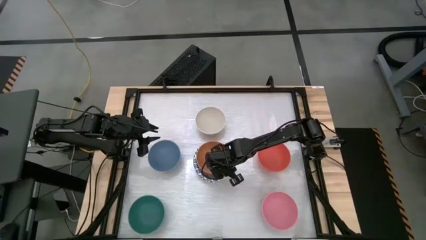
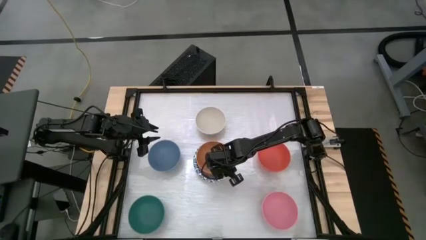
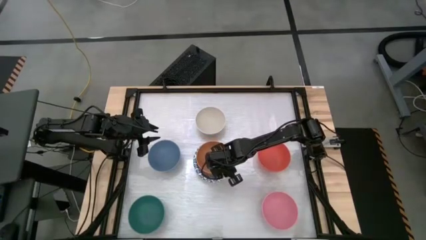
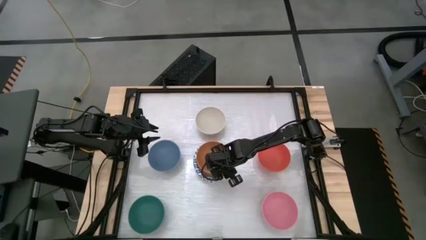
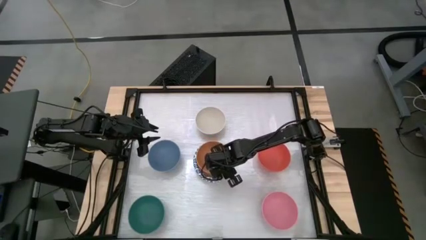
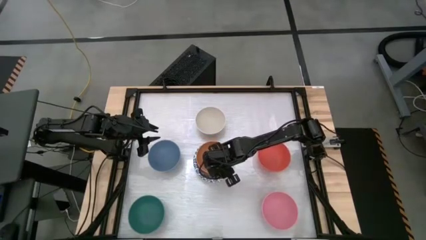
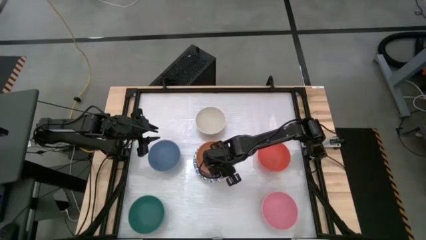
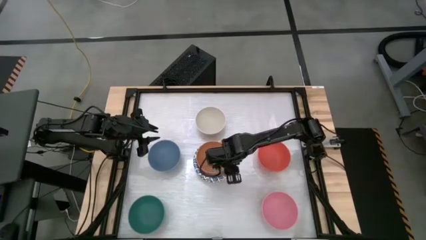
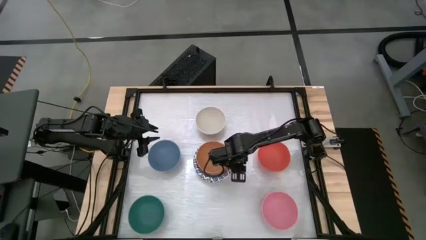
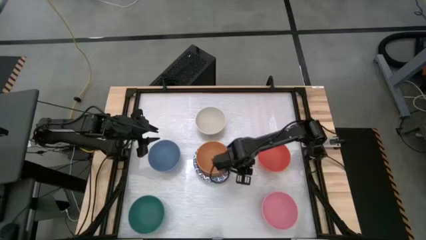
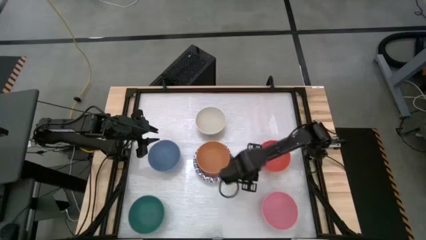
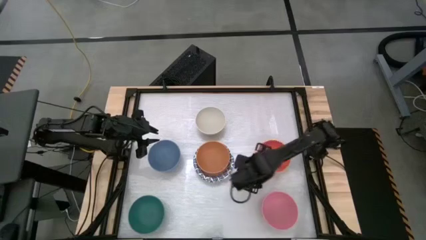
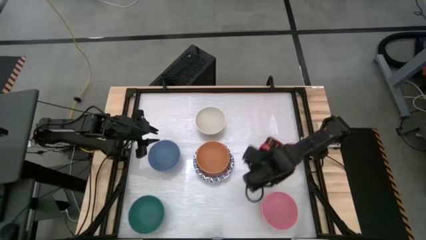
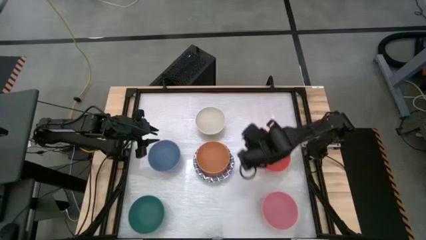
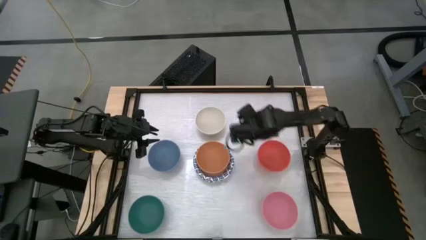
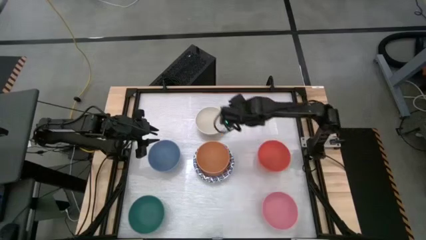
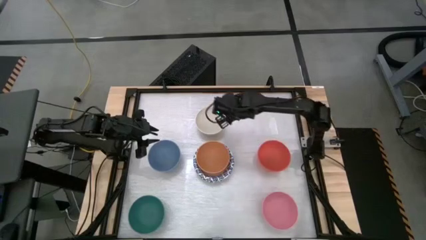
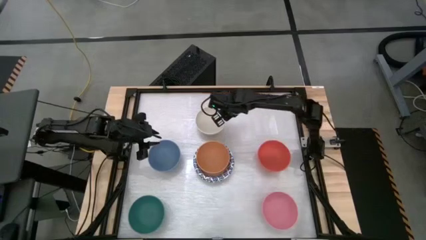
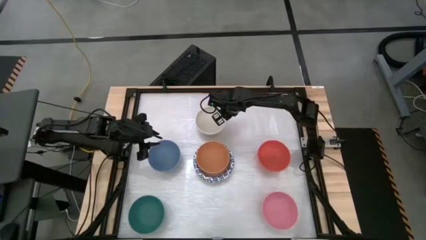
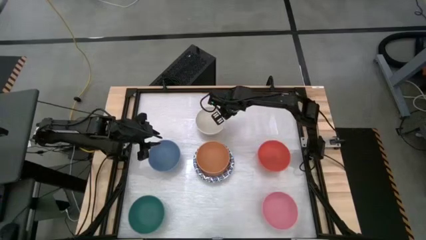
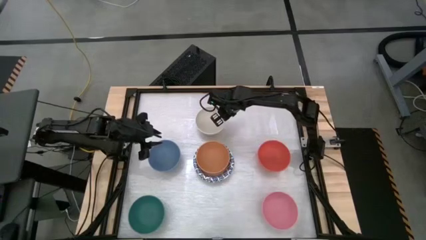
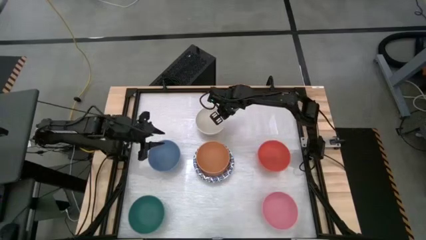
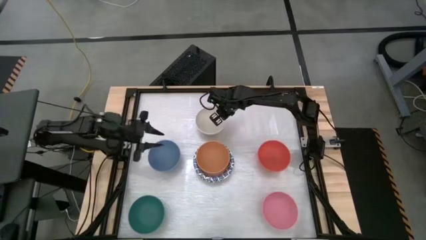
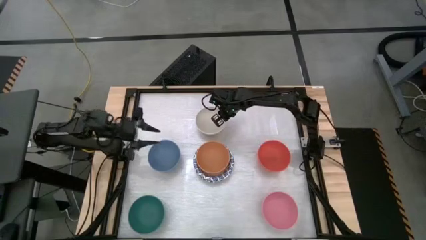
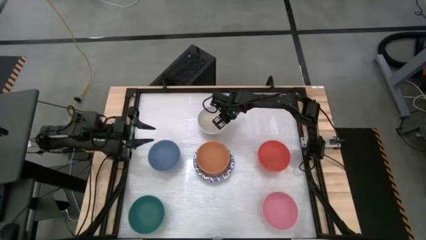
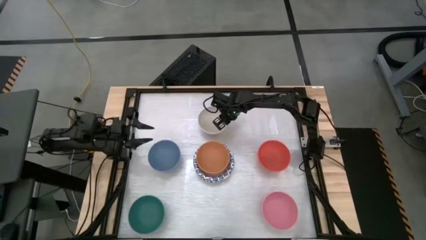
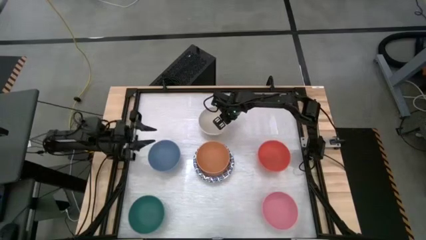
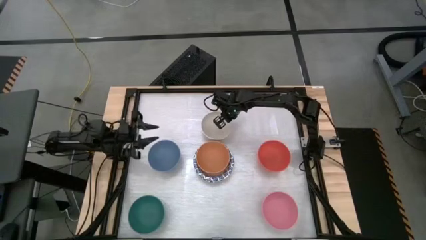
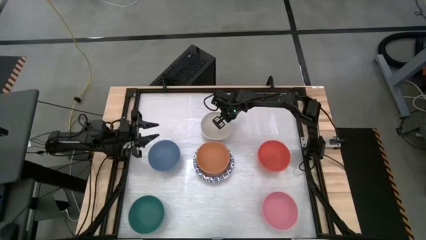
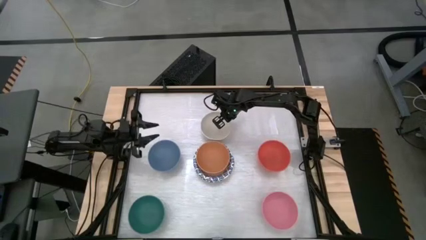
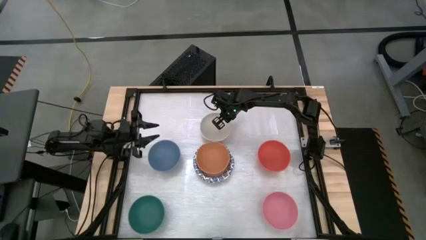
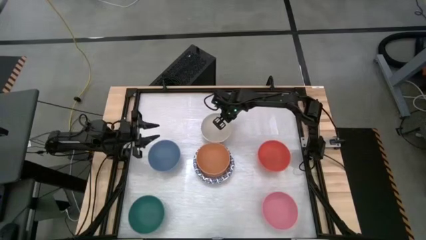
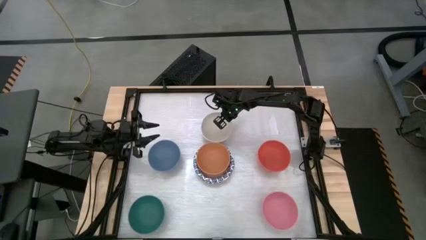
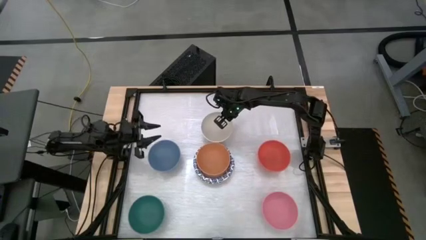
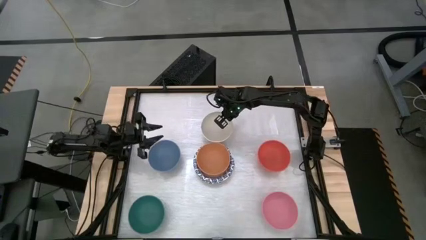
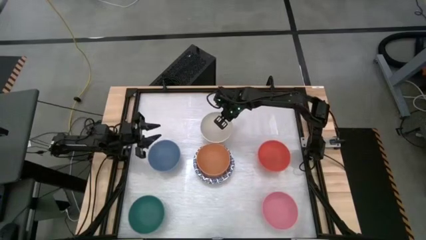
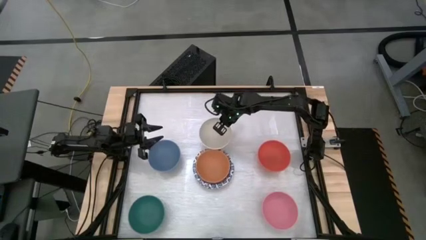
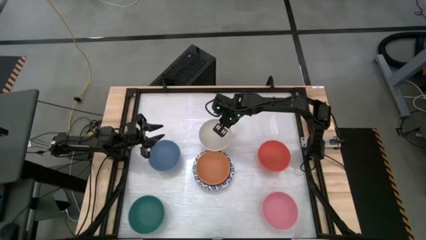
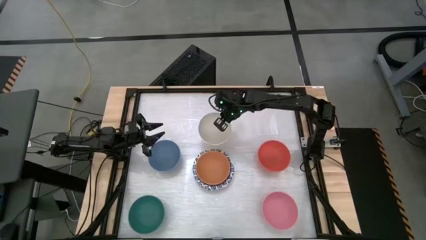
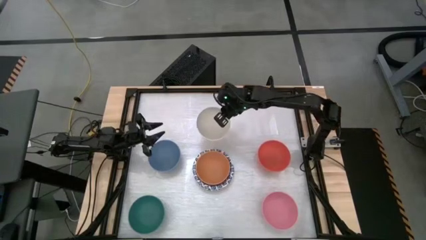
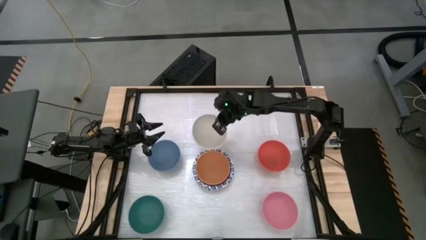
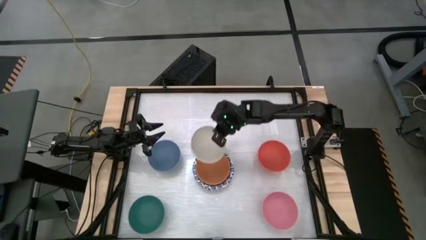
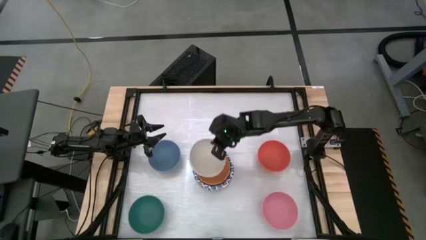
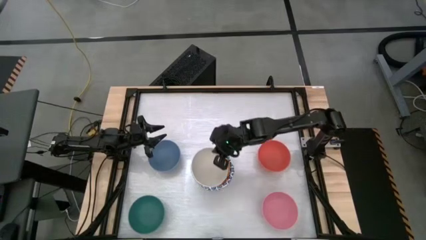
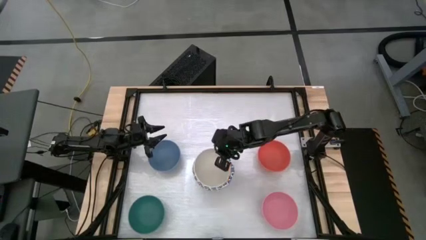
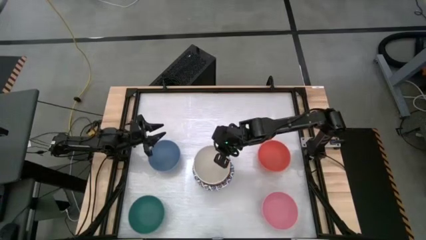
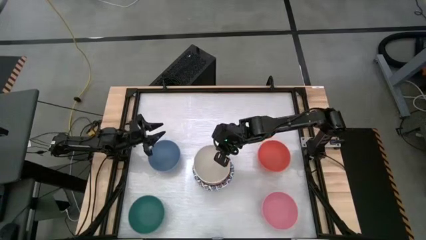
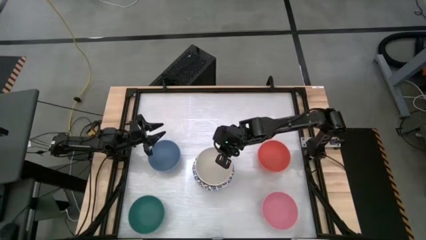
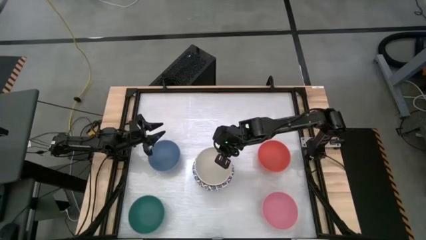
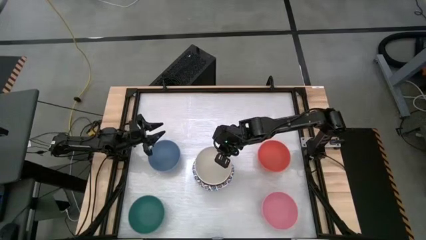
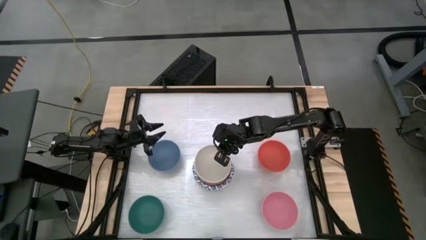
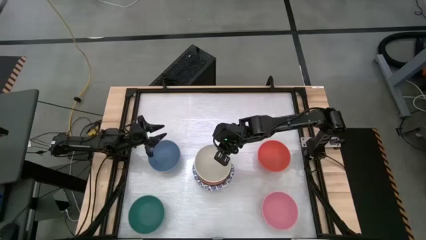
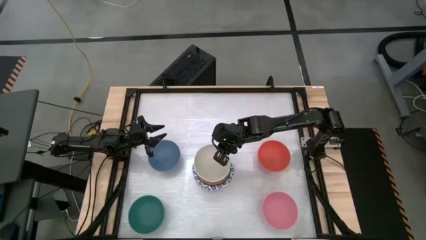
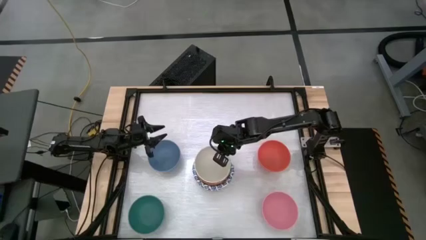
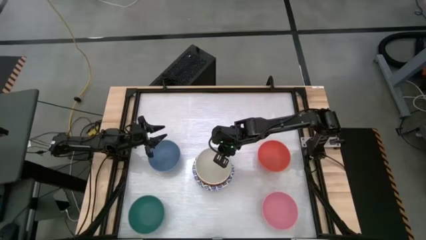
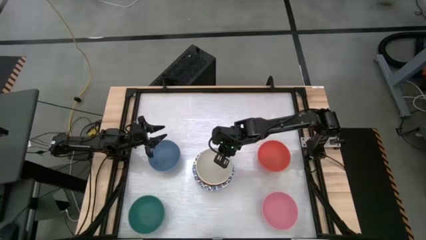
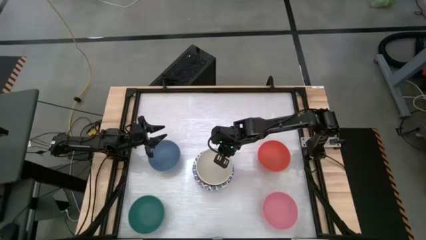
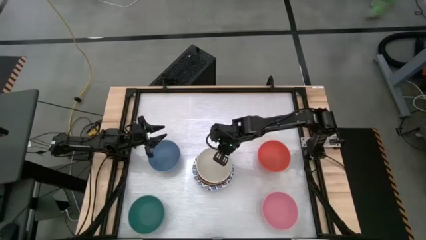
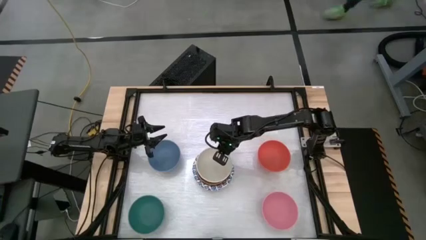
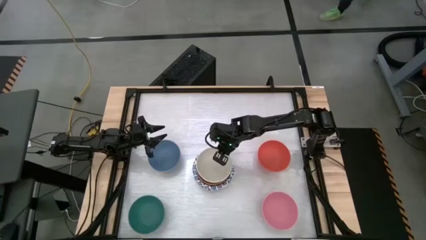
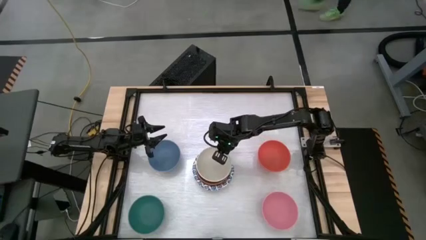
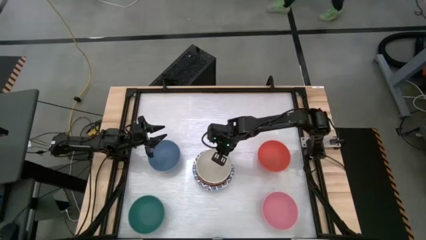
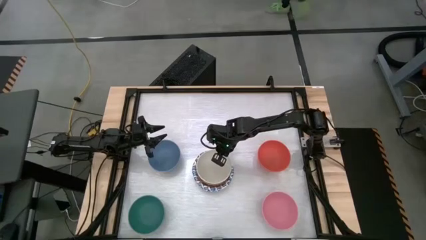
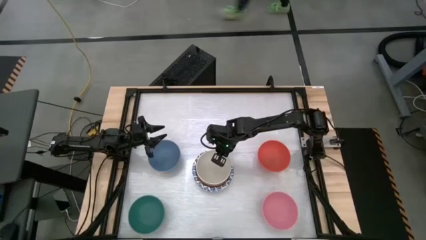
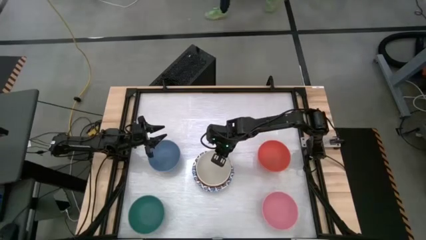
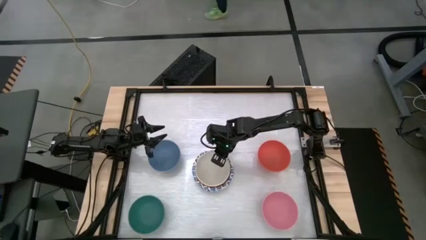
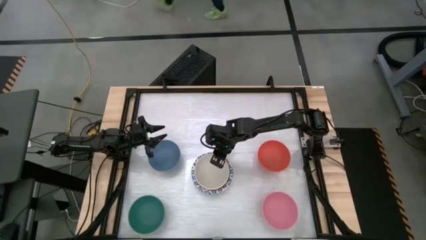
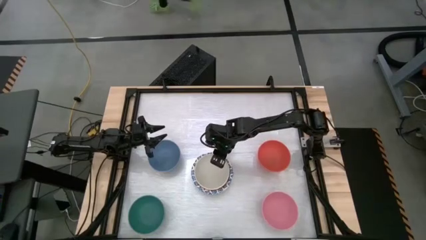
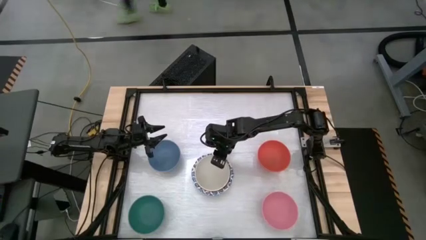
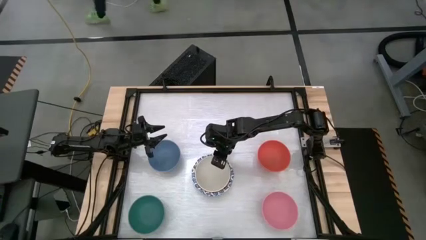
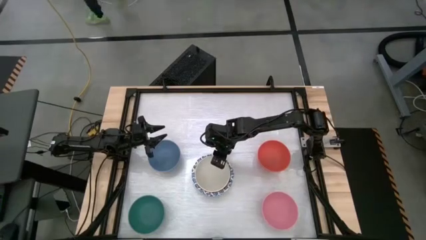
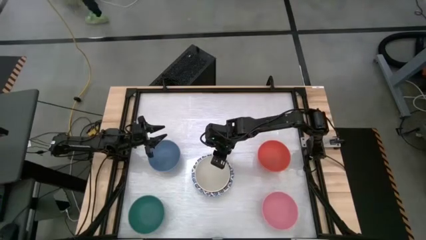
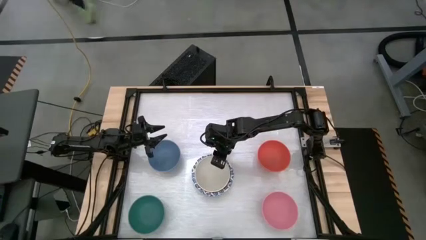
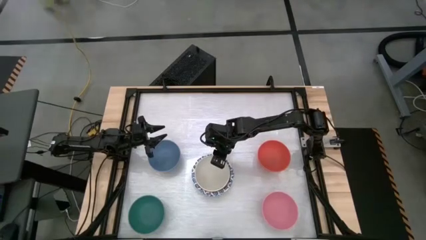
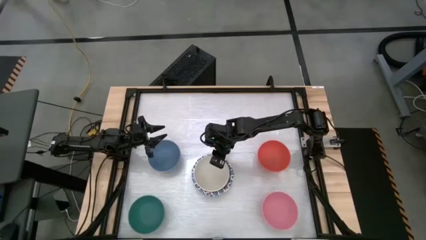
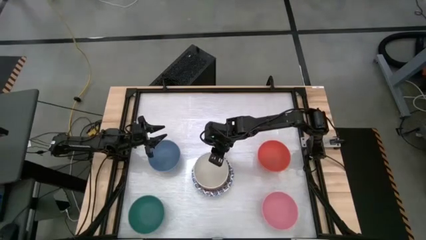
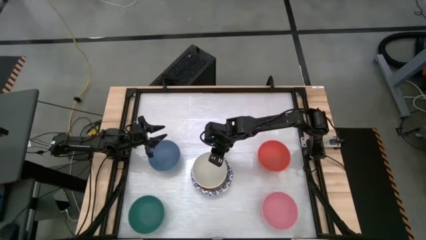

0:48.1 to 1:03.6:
Task: Nest bowls inside each other by size order
Stack the white bowl into the orange bowl
